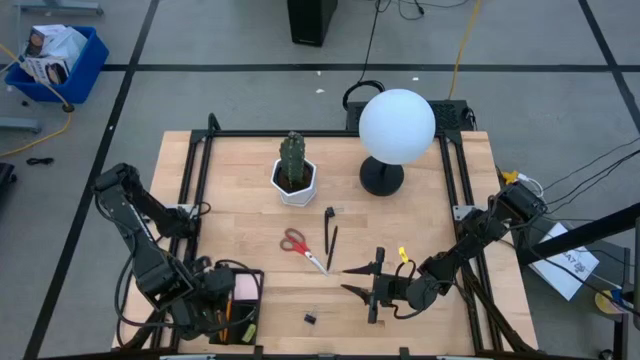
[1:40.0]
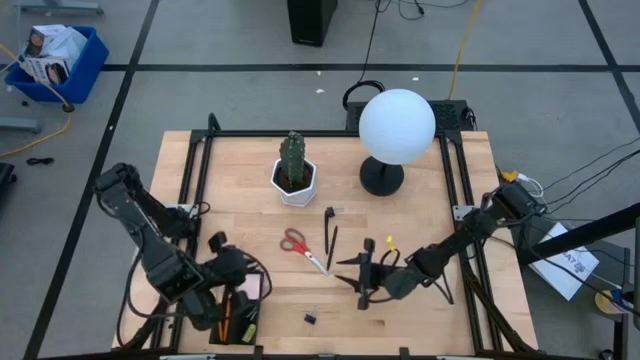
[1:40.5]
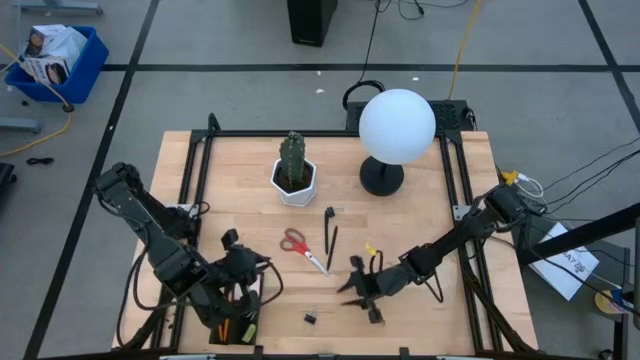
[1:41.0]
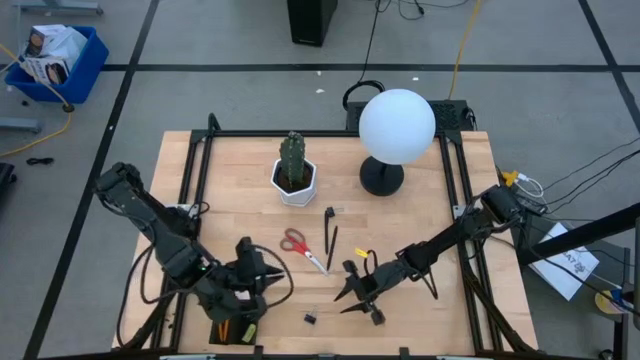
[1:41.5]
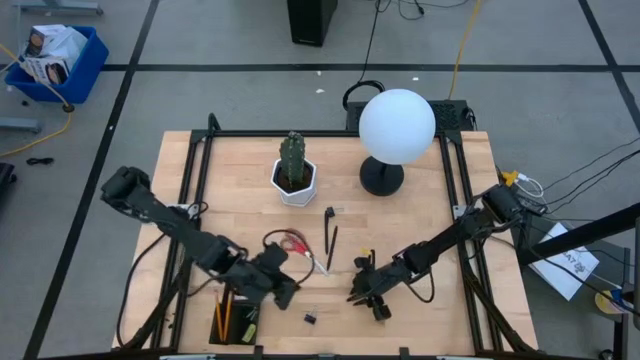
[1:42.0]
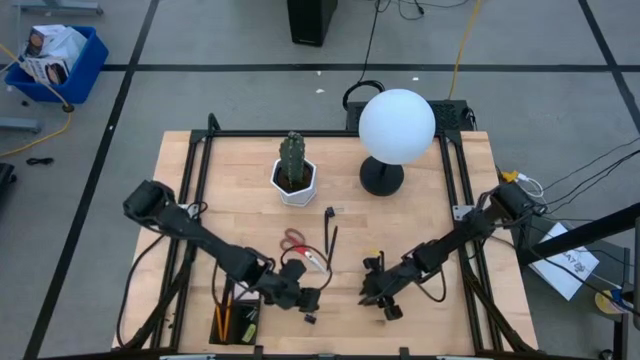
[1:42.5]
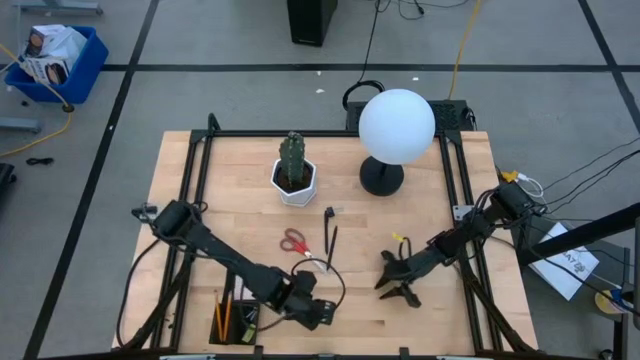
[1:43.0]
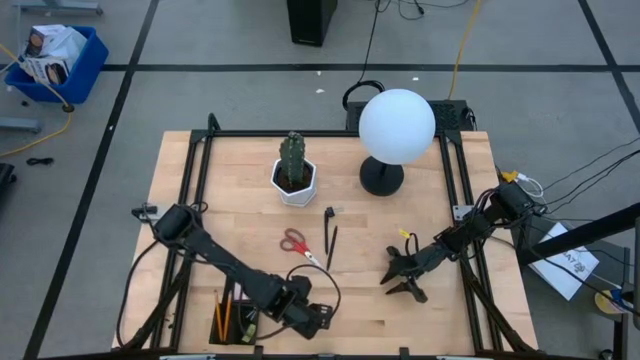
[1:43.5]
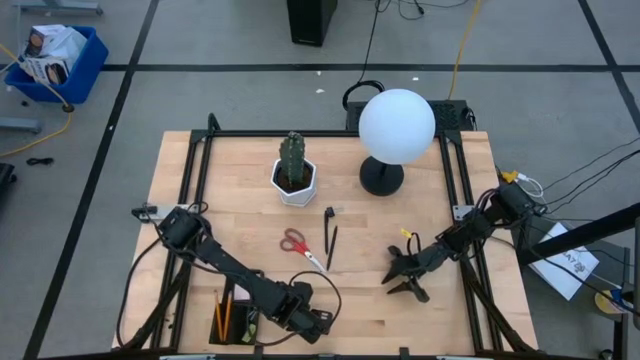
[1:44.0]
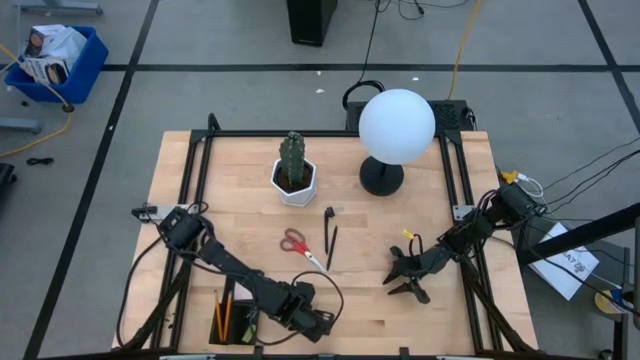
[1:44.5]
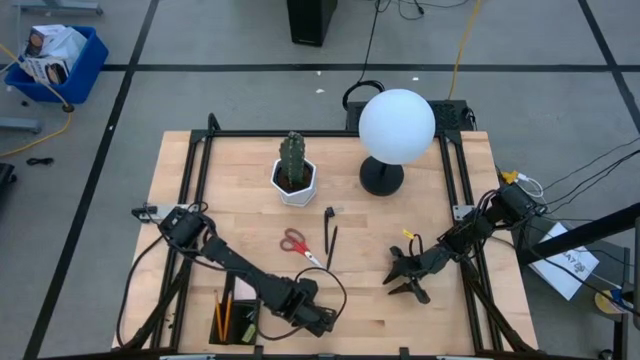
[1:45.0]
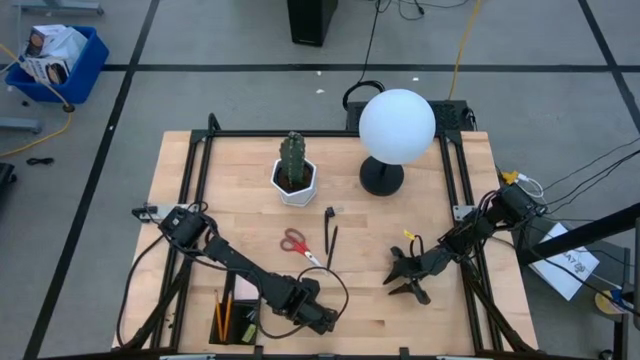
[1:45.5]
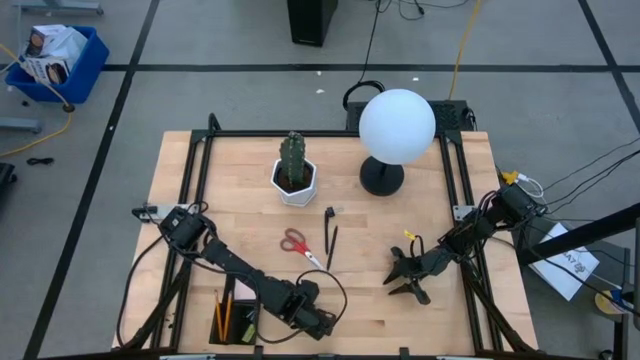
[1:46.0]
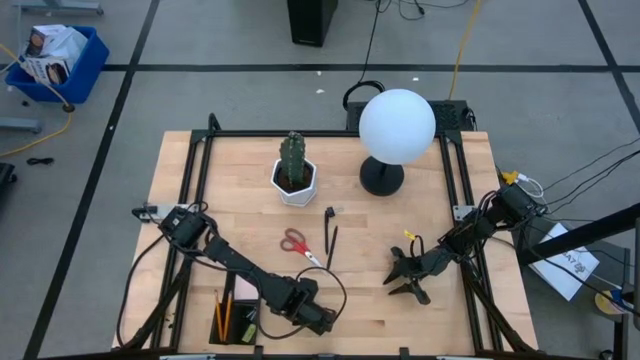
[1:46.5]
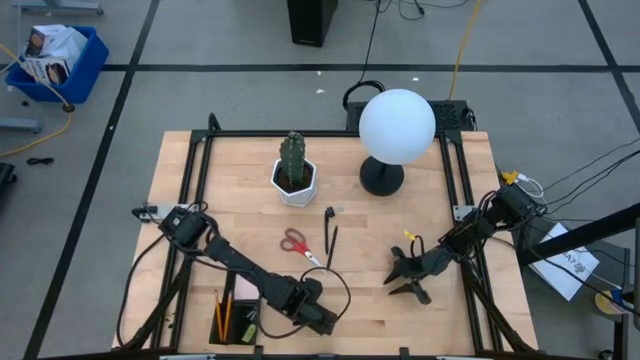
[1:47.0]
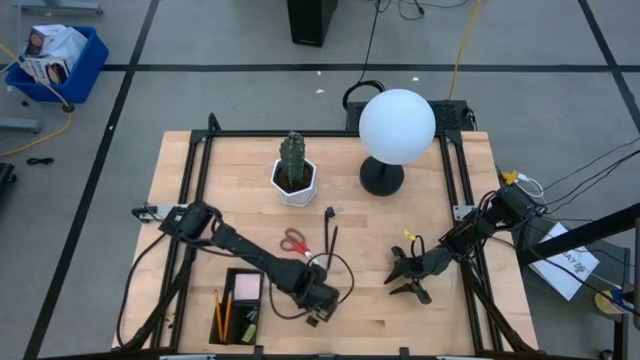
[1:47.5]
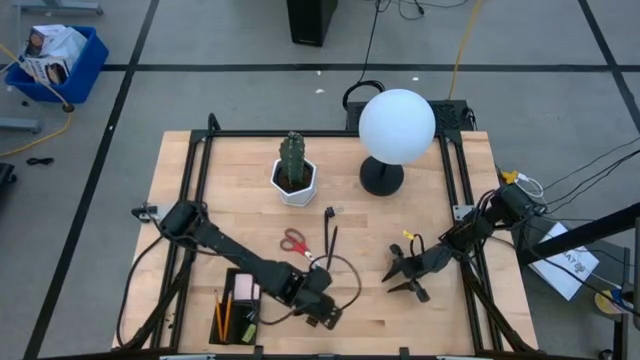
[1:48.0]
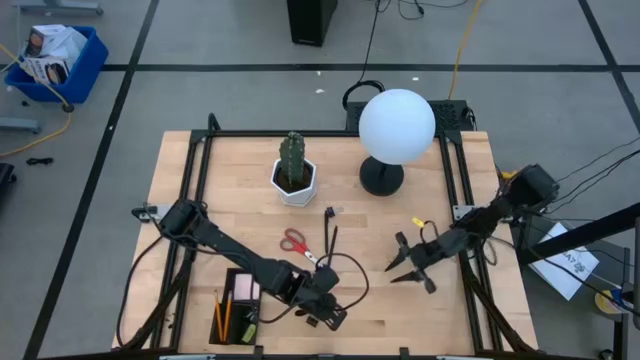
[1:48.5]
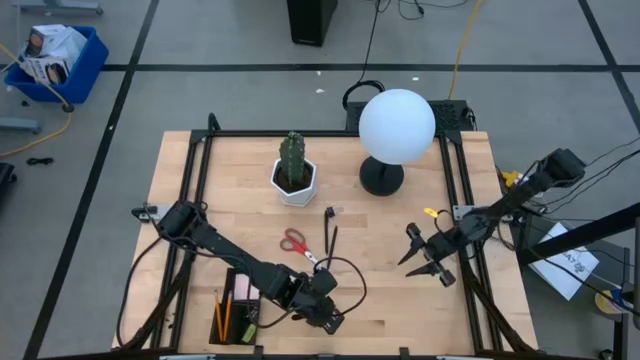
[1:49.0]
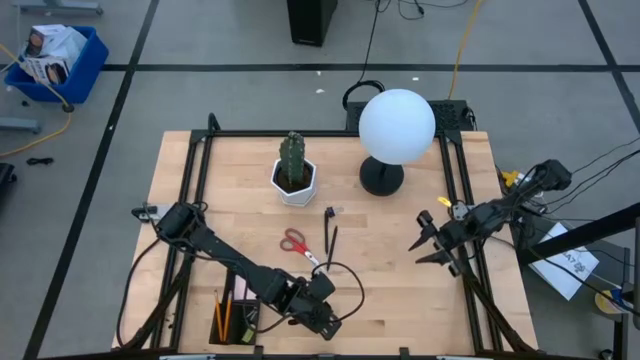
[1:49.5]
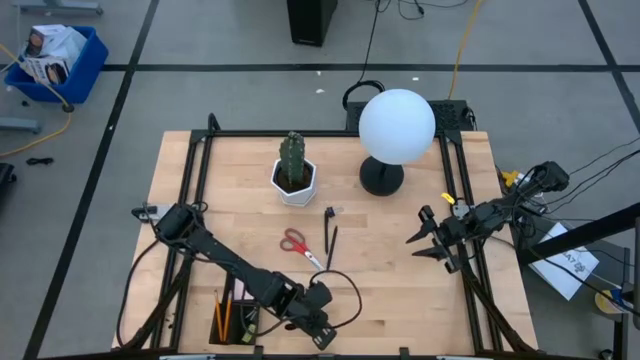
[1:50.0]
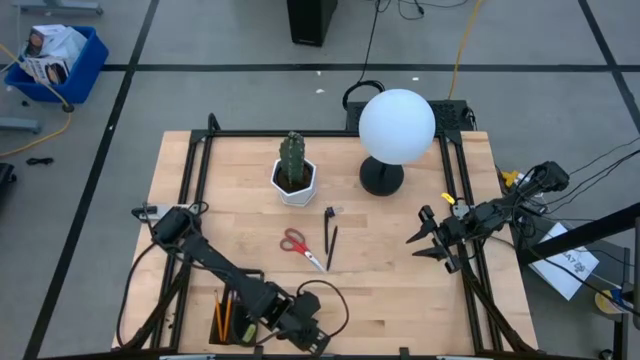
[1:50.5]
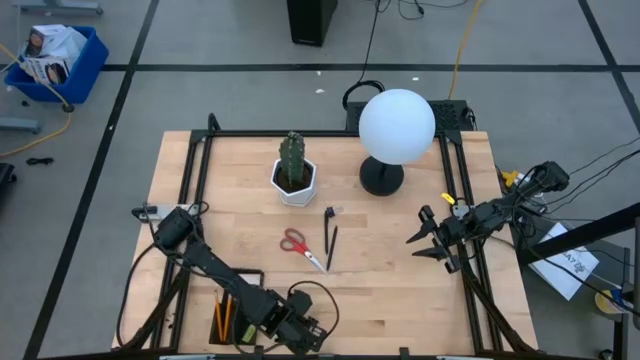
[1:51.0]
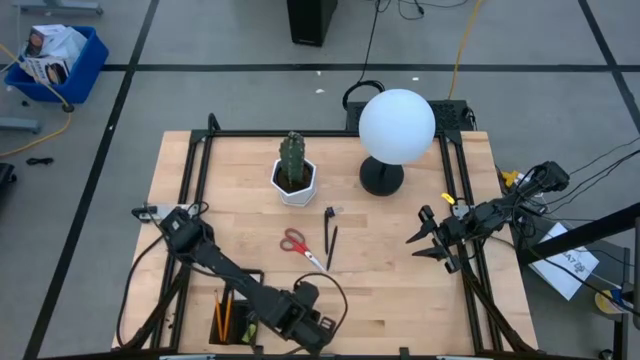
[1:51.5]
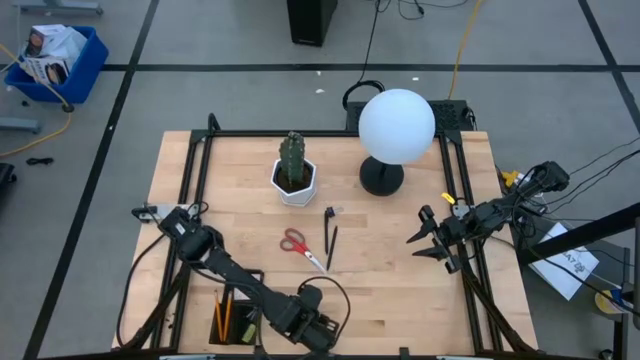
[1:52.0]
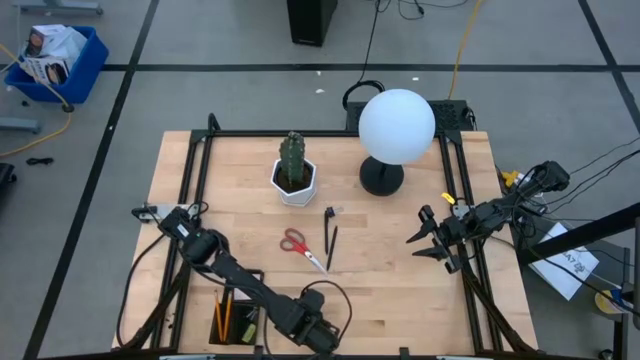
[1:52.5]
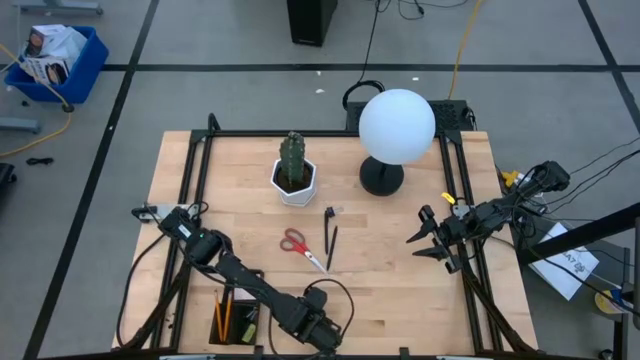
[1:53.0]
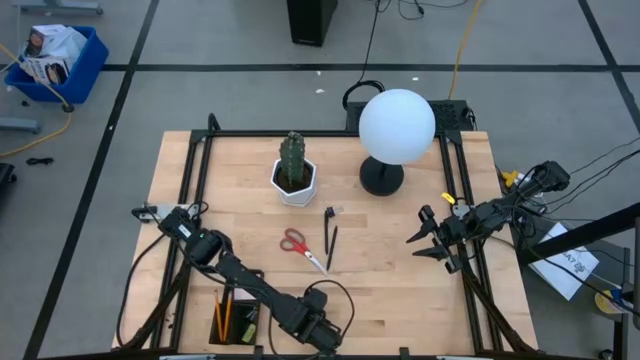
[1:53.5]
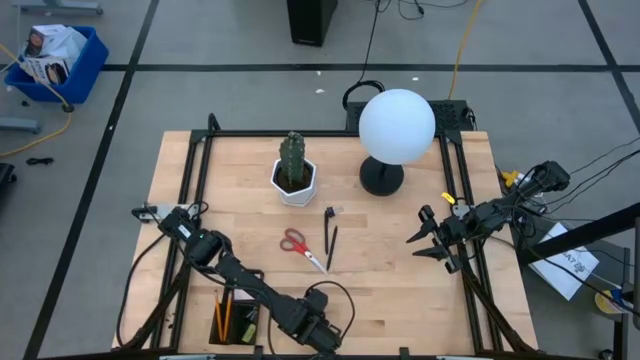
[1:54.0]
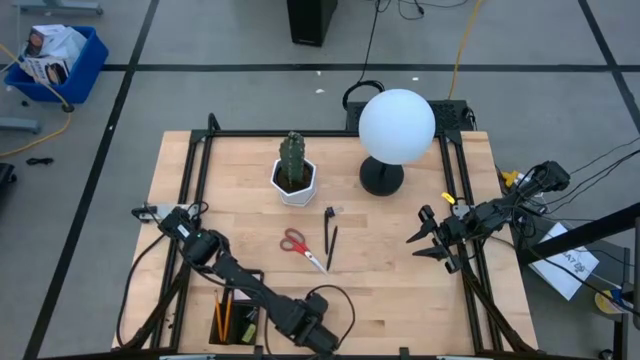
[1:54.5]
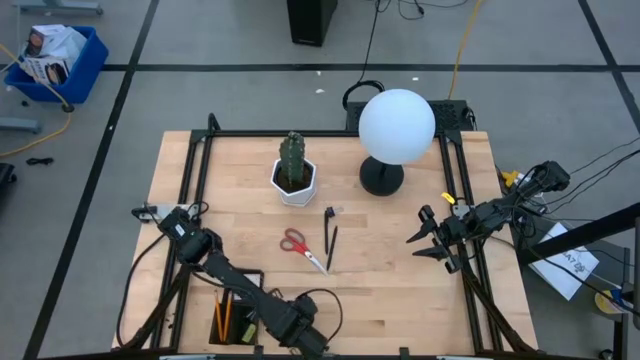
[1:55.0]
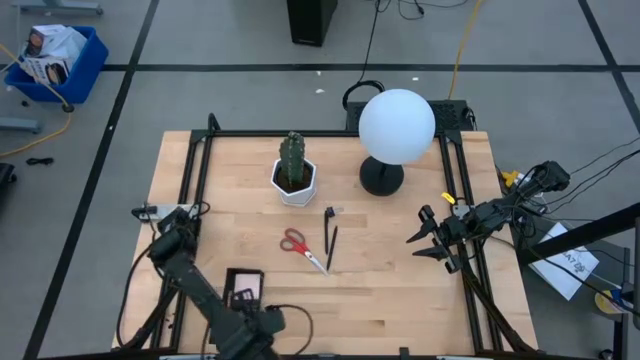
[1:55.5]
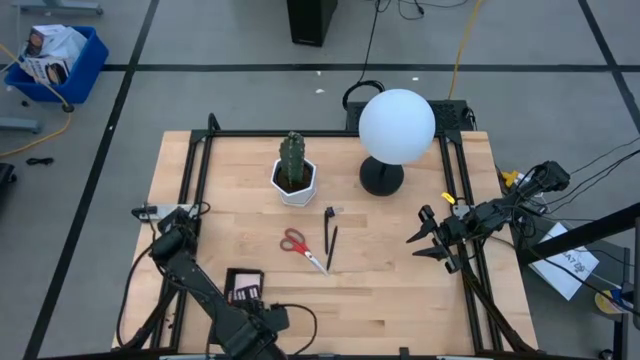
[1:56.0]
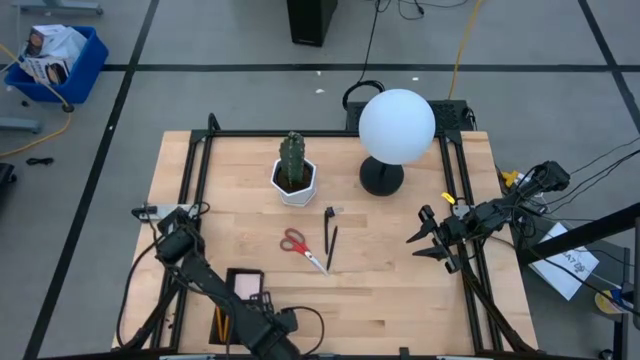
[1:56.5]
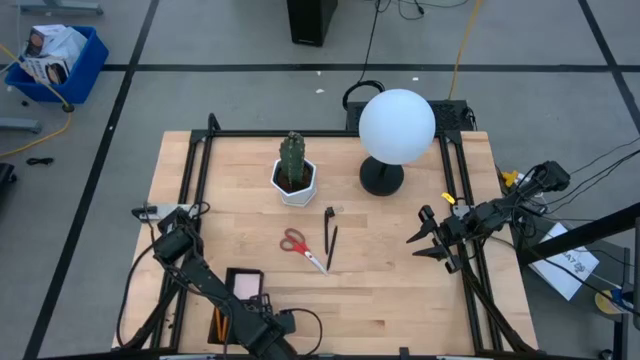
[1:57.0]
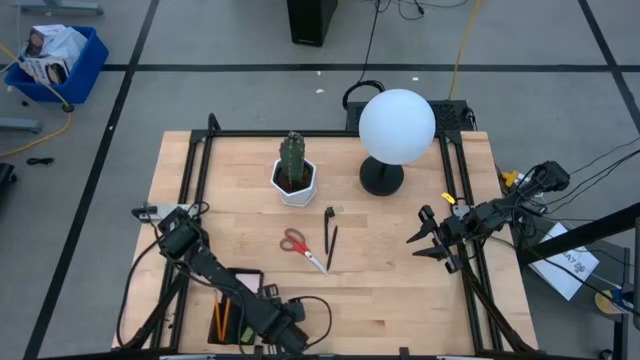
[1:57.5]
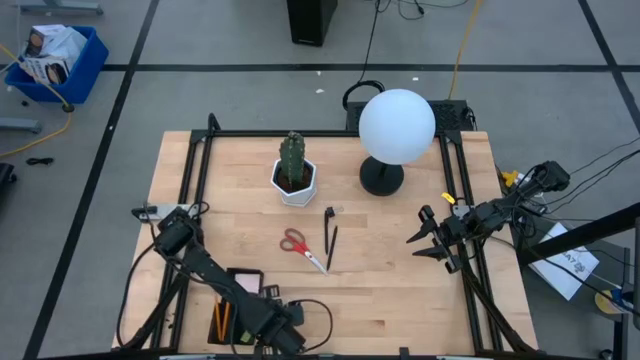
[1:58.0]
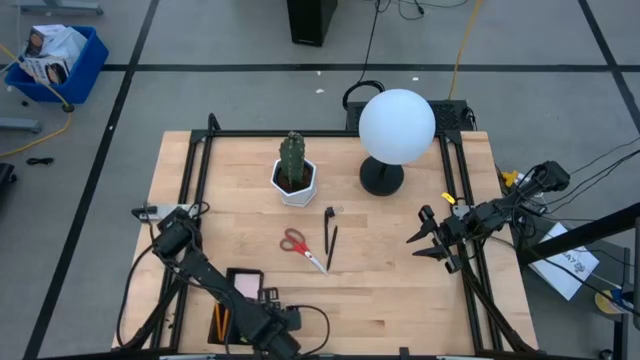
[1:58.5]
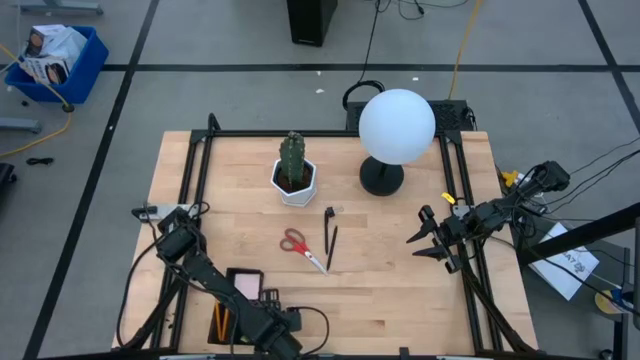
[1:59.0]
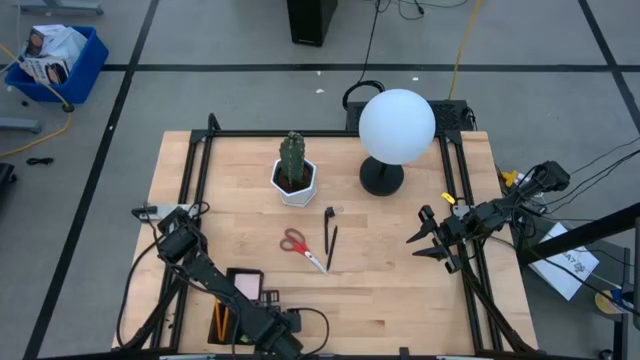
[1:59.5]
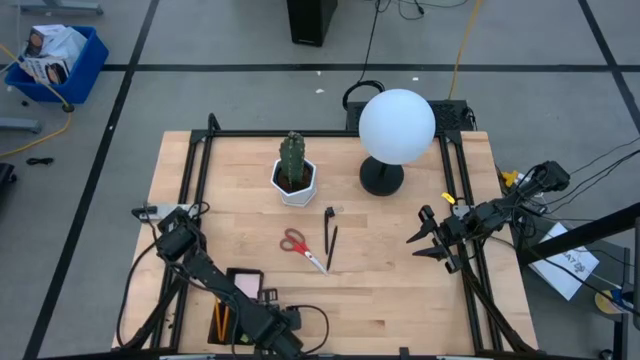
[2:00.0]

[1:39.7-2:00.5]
Task: Pick and place office supplies into organizer
Put the bottom binder clip in the desk organizer

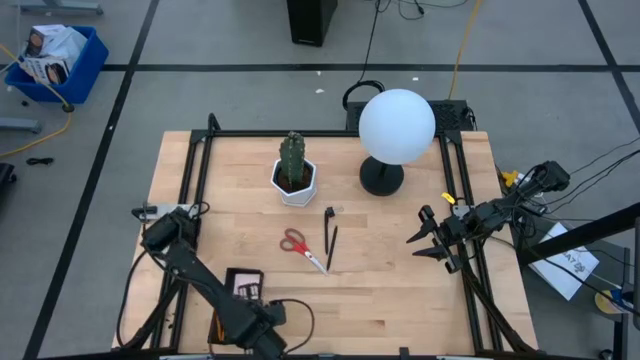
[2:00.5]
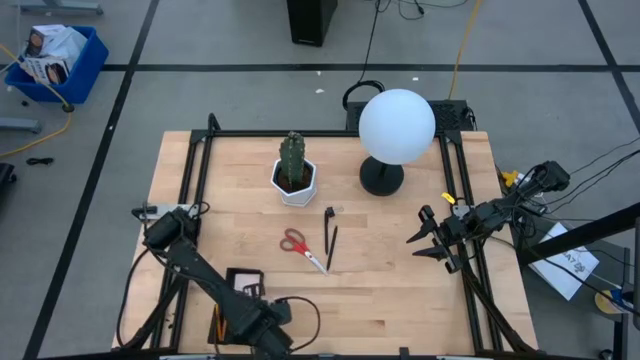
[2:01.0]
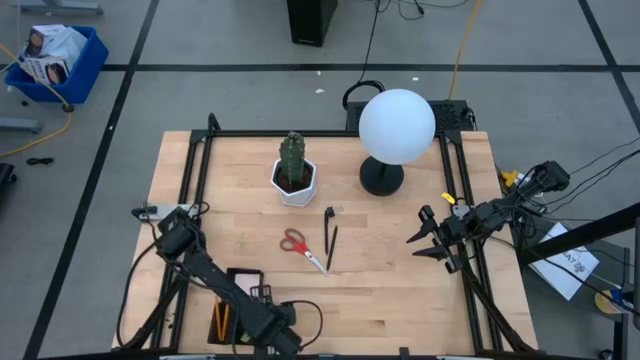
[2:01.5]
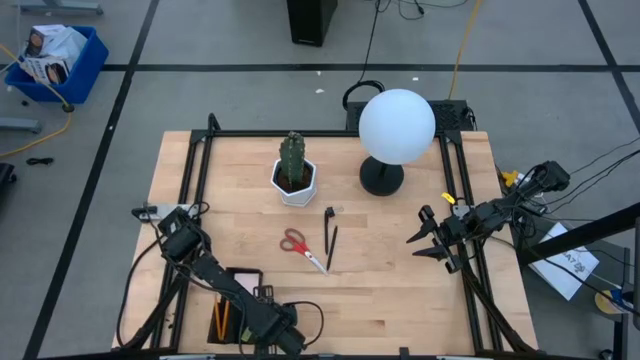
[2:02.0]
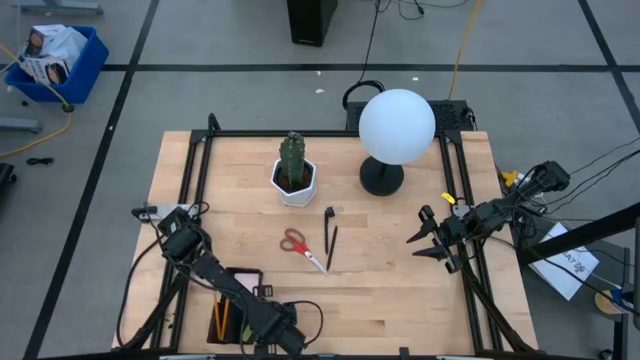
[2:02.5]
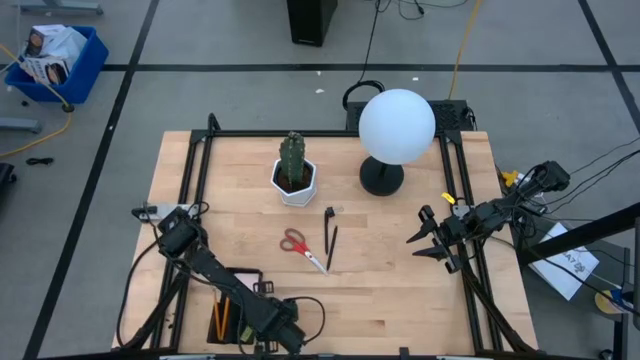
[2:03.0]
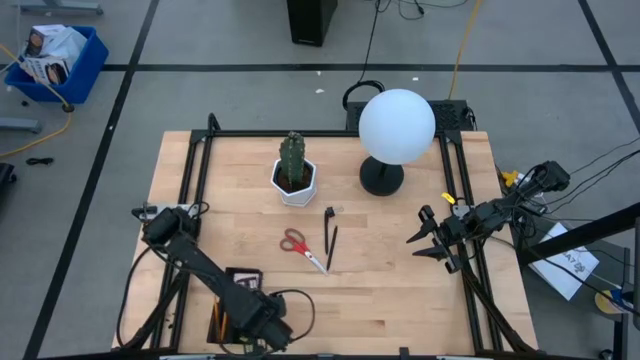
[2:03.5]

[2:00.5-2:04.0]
Put the bottom binder clip in the desk organizer
